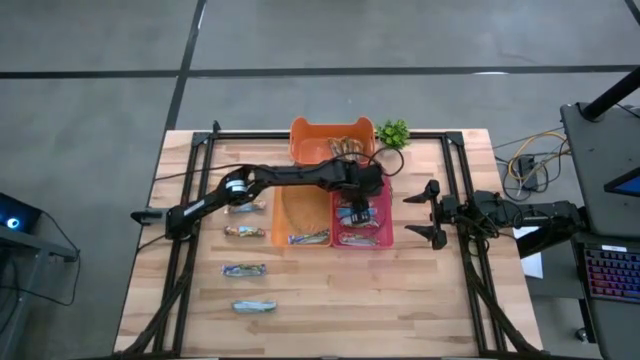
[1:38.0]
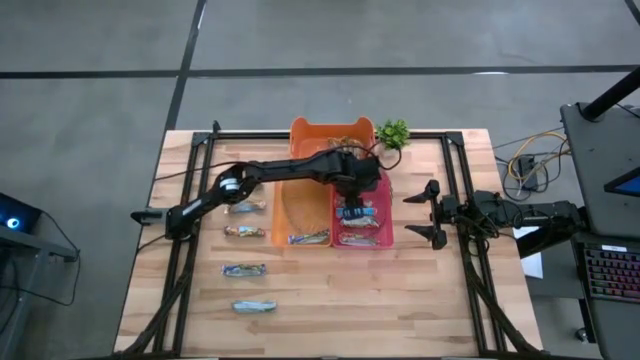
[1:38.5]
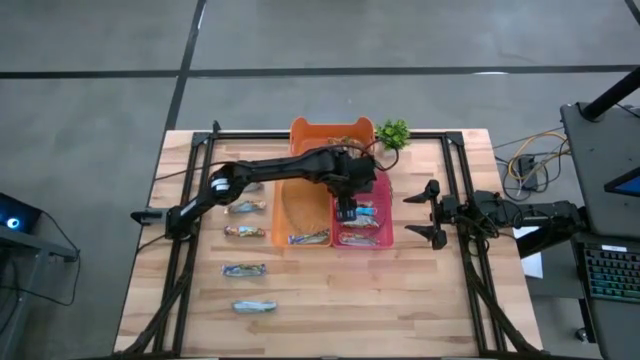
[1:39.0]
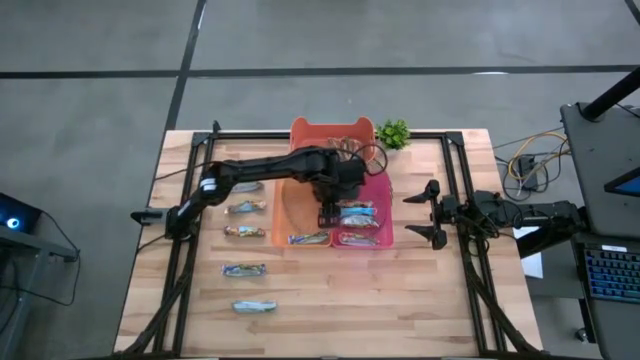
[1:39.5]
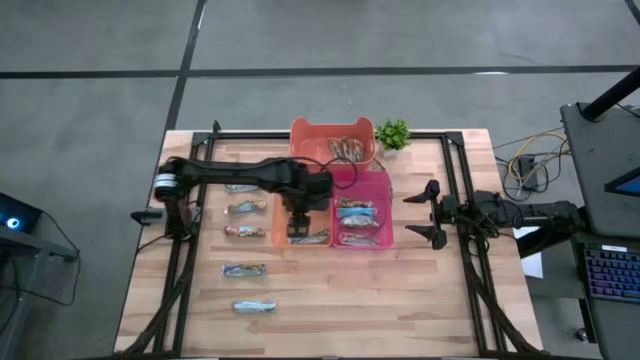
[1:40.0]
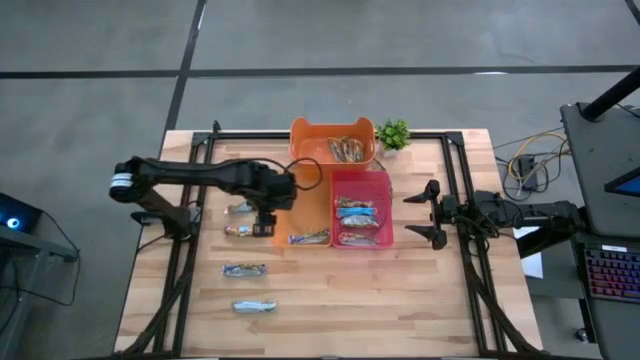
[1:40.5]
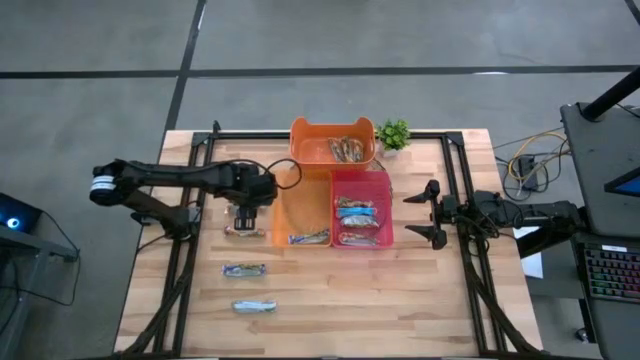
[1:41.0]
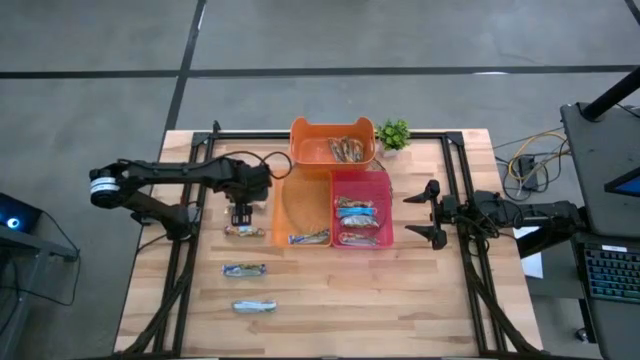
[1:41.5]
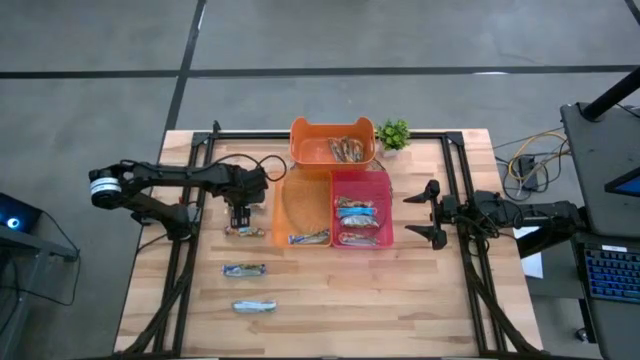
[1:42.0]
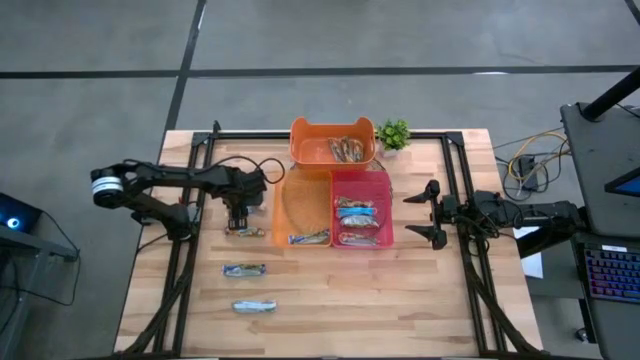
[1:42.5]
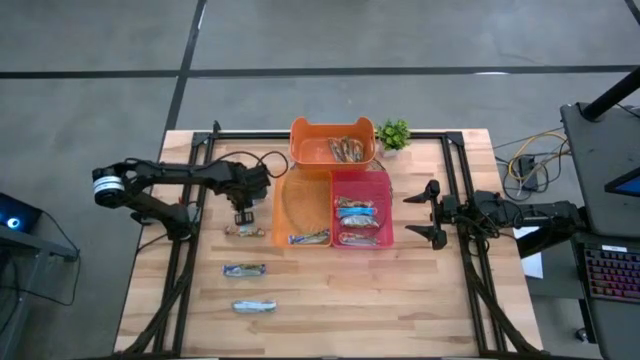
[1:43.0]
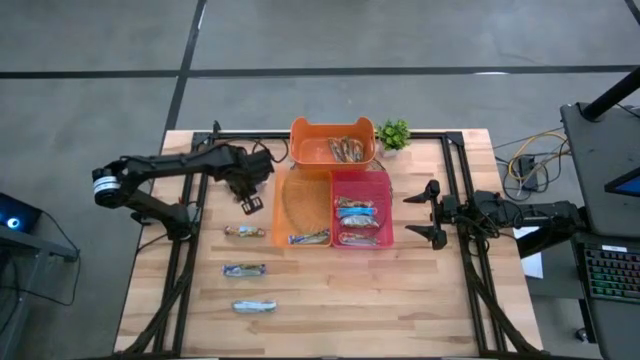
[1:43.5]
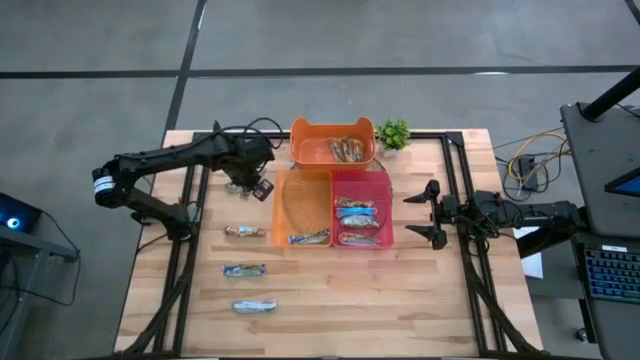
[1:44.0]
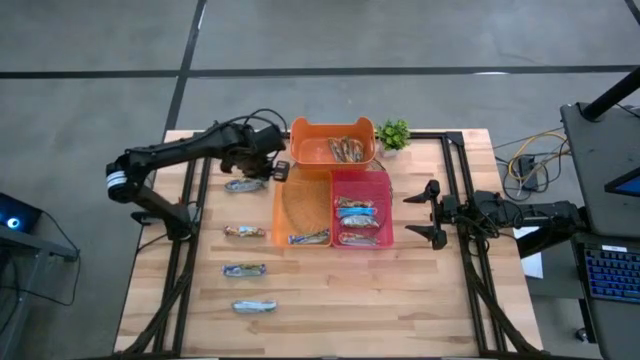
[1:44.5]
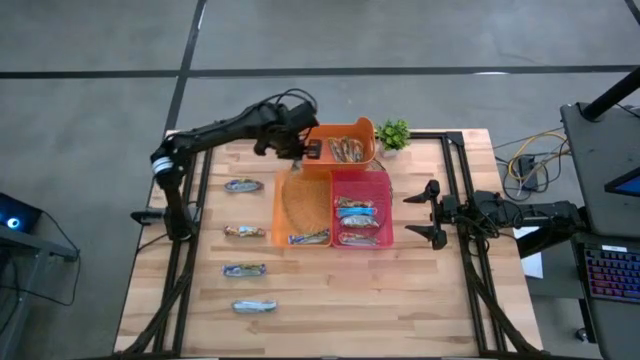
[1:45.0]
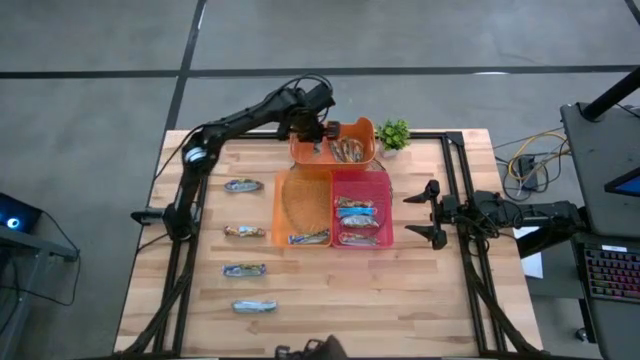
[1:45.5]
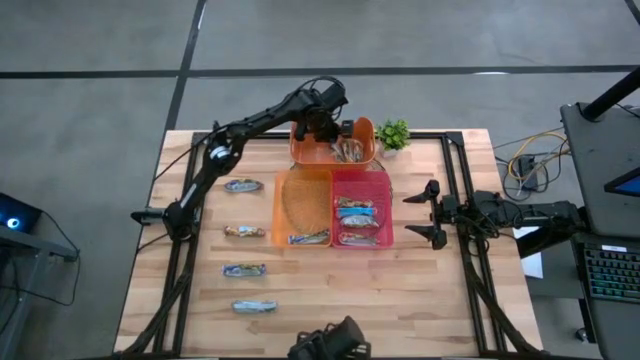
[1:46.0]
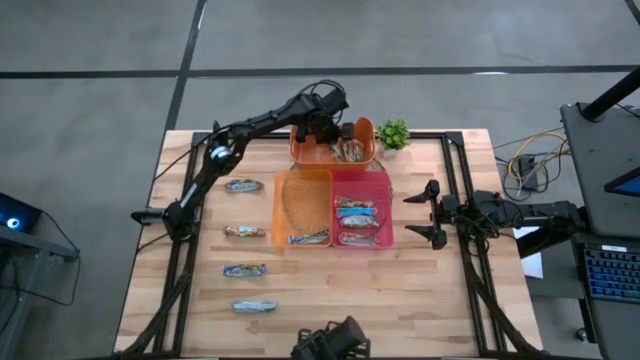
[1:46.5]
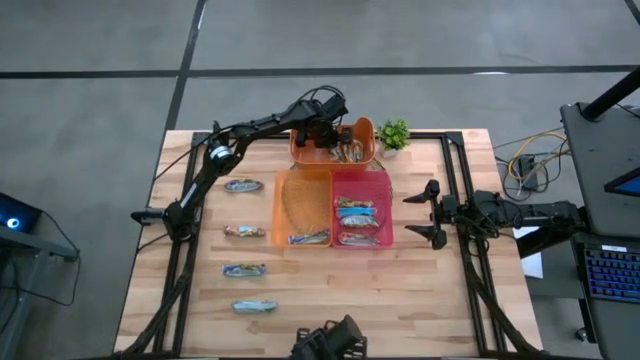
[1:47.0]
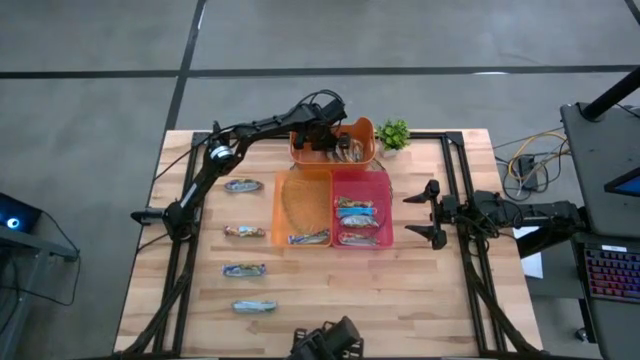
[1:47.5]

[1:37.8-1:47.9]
Task: Pick and place Granola Bars by type
Put the yellow granola bar into the orange bin

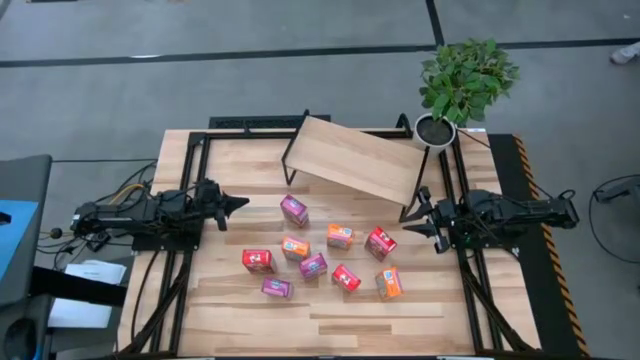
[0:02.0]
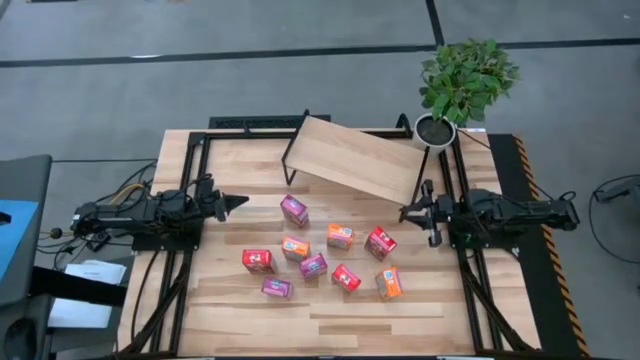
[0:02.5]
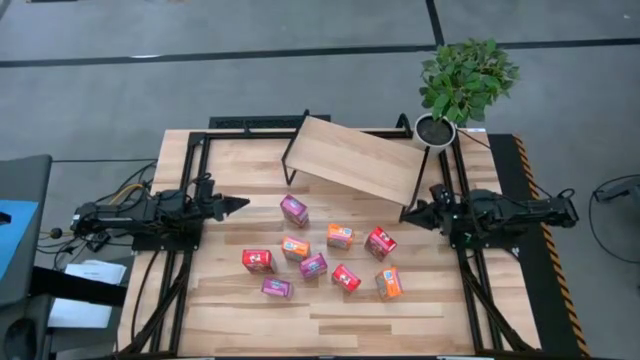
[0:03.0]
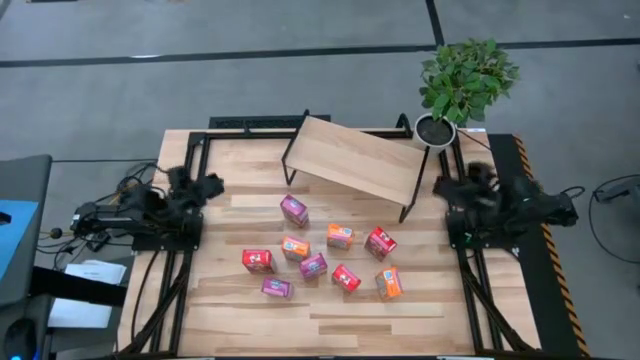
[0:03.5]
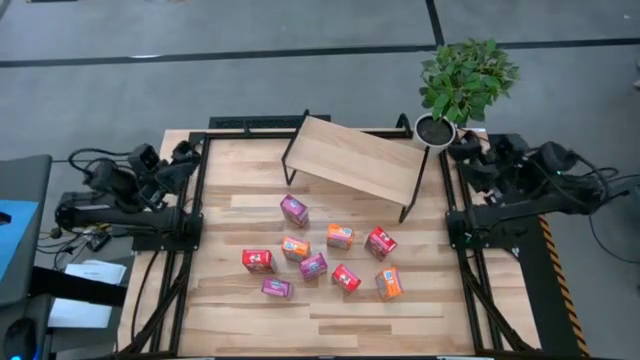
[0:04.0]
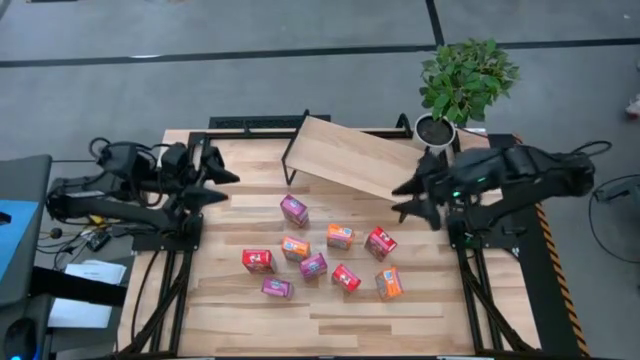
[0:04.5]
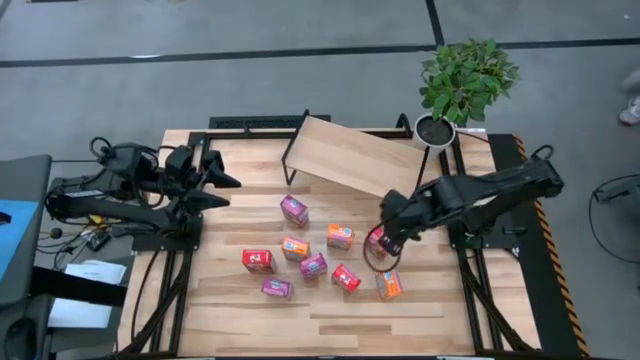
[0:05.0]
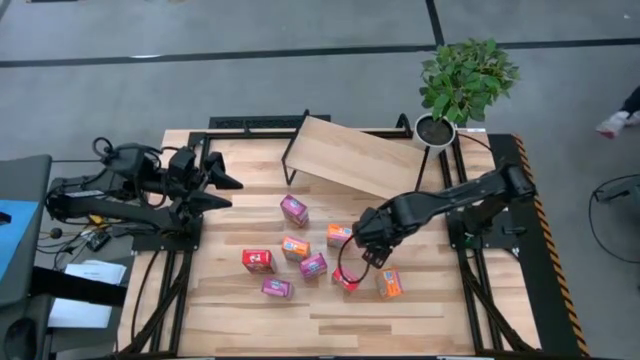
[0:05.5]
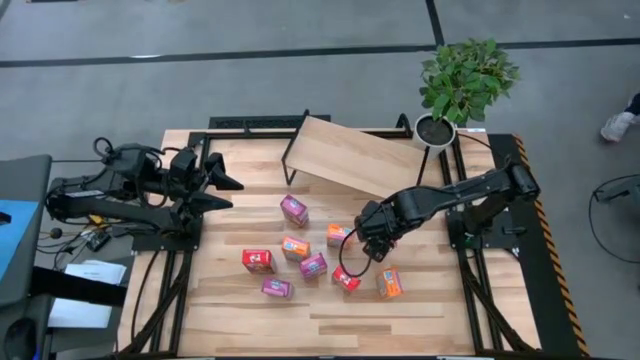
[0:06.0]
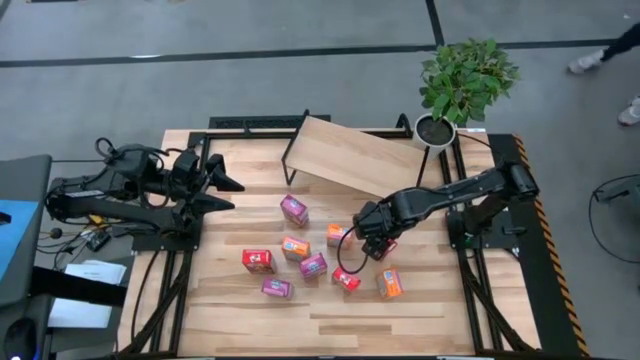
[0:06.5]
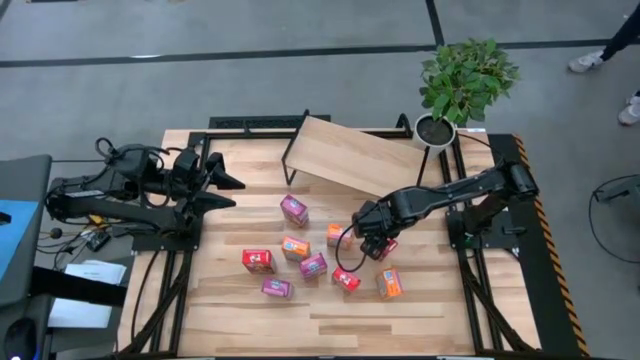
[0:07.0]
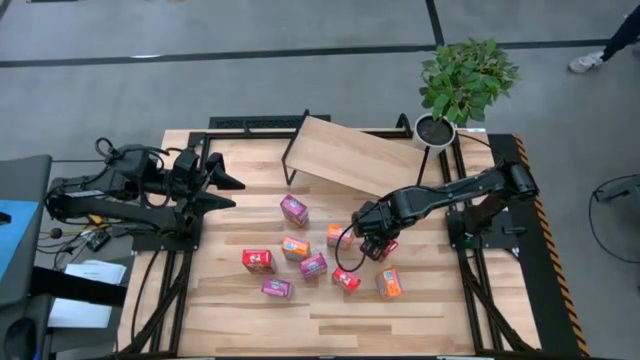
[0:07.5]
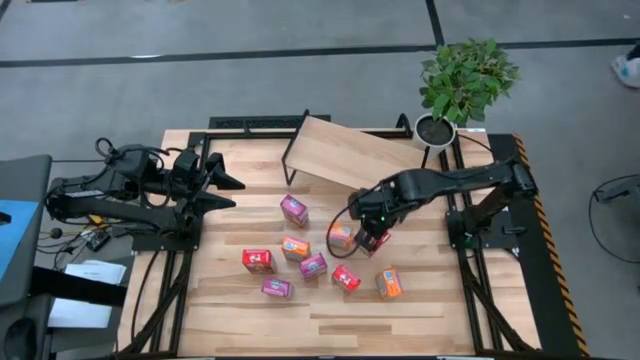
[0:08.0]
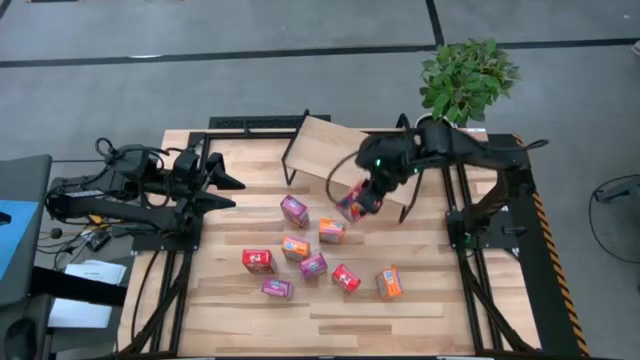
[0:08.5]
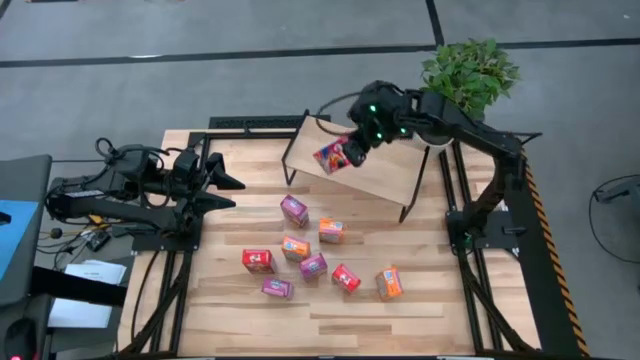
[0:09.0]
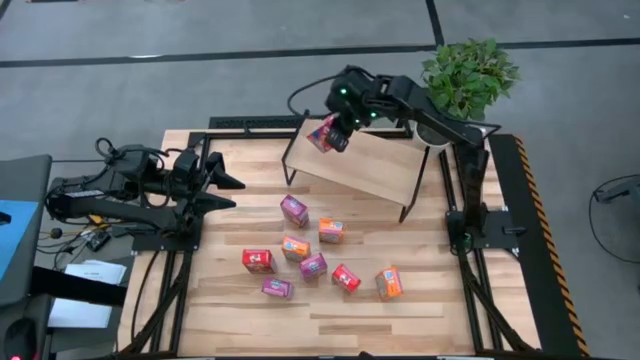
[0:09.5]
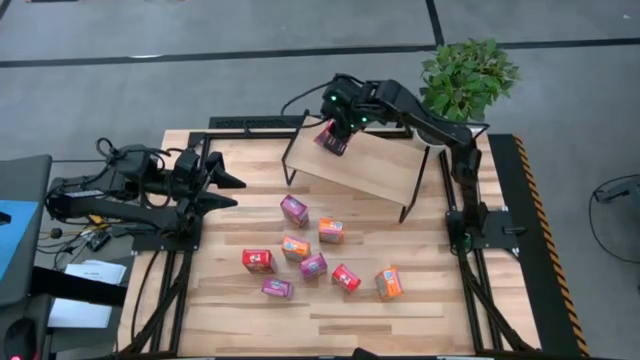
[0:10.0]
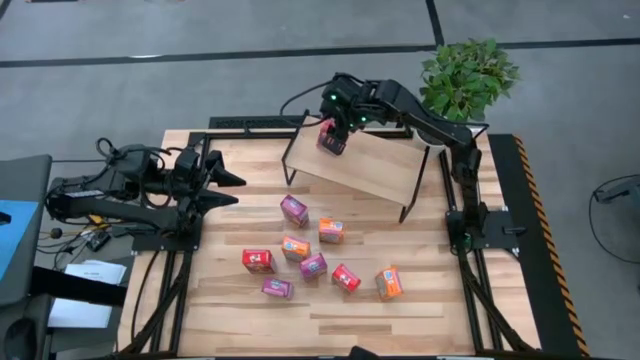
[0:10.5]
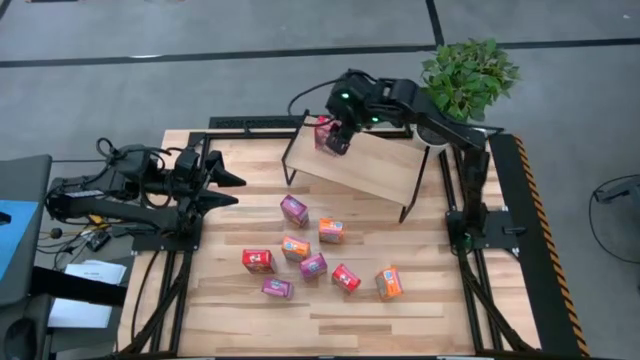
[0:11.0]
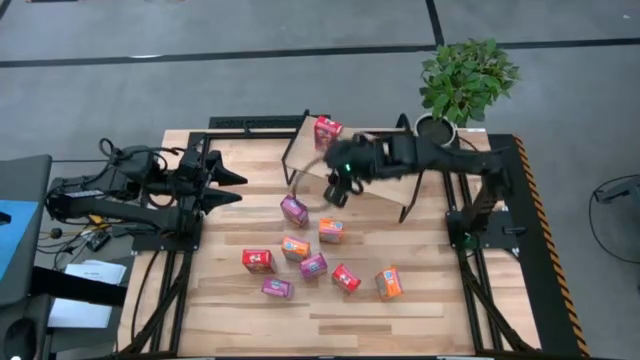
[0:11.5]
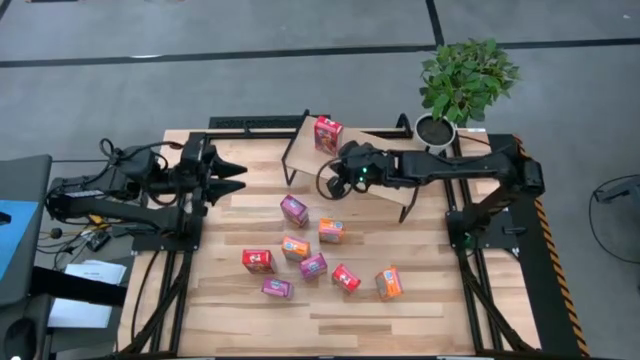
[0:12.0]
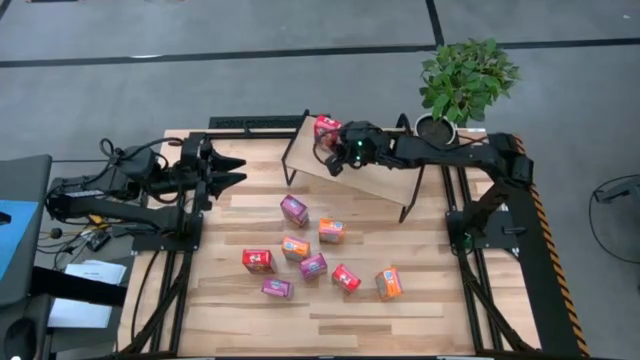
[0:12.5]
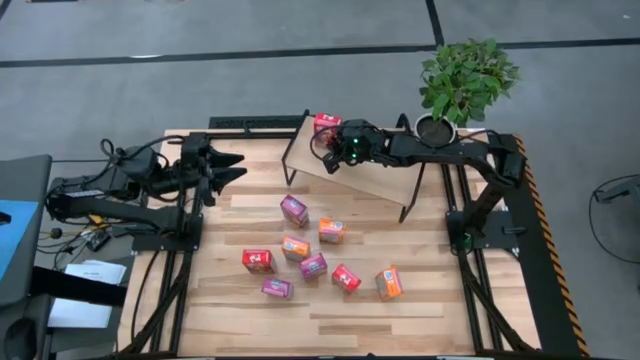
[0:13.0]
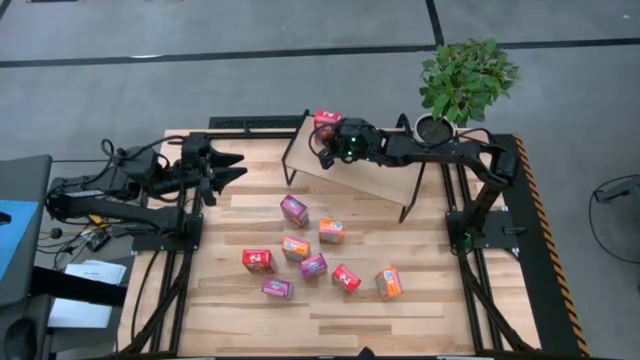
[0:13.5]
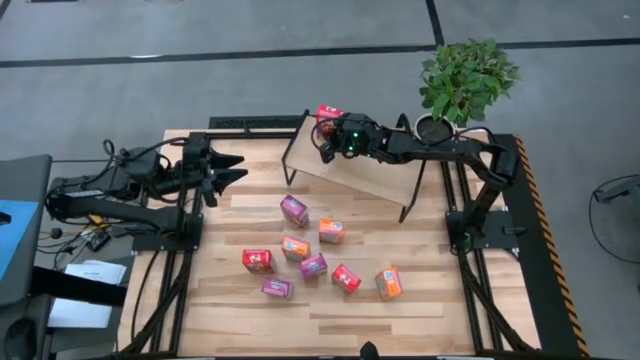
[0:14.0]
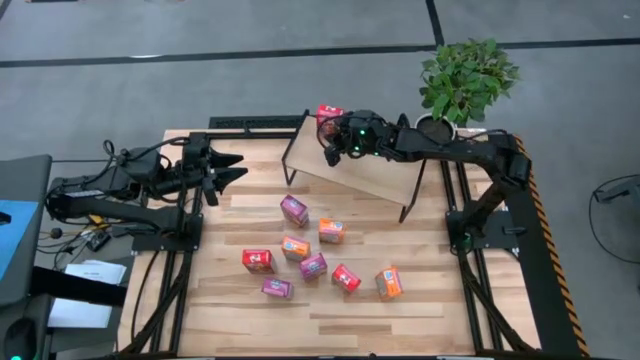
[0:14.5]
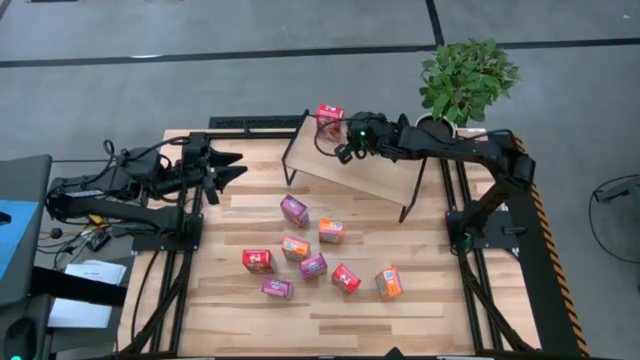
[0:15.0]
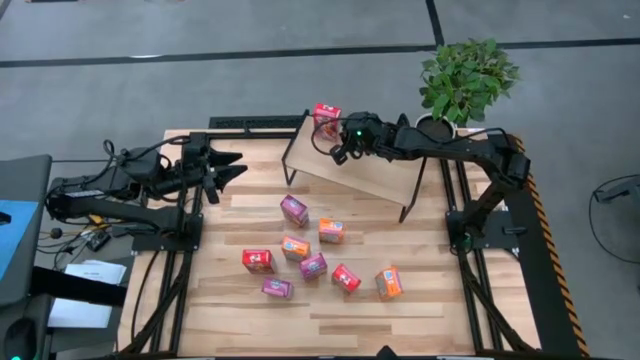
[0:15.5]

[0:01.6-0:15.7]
Task: Stack cereal on shelf
Put the top right red cereal box on the shelf
